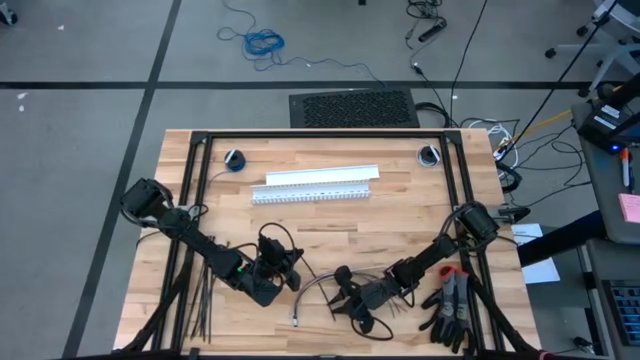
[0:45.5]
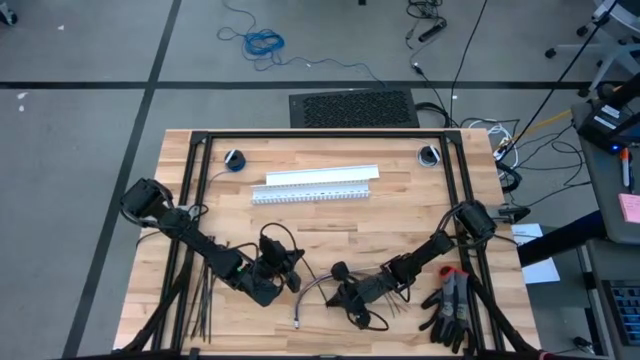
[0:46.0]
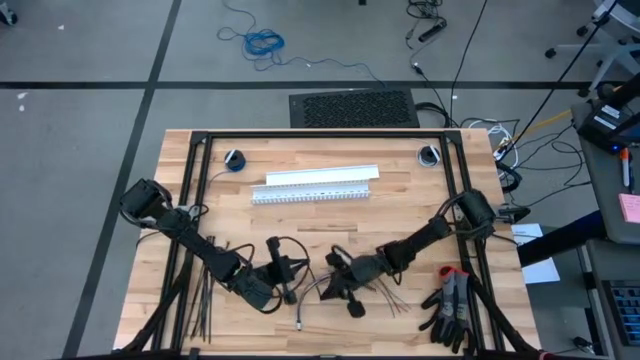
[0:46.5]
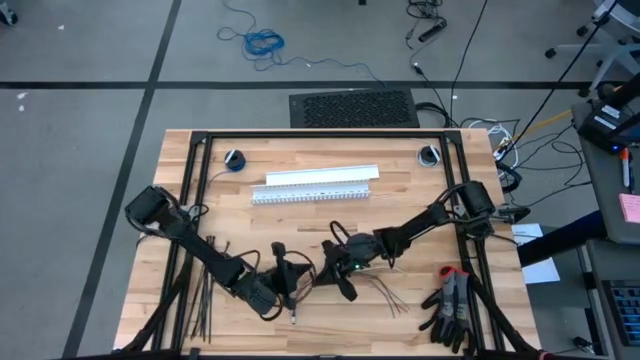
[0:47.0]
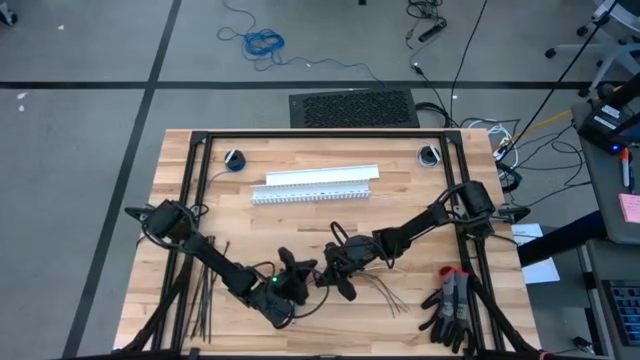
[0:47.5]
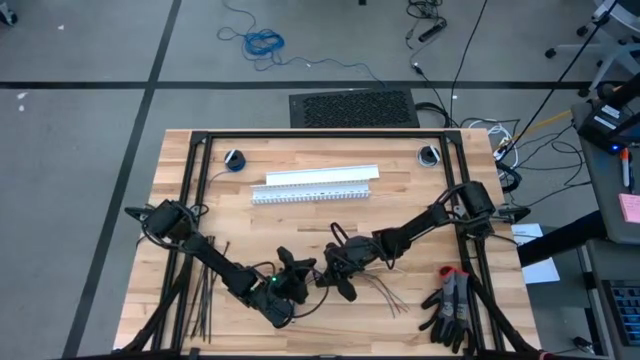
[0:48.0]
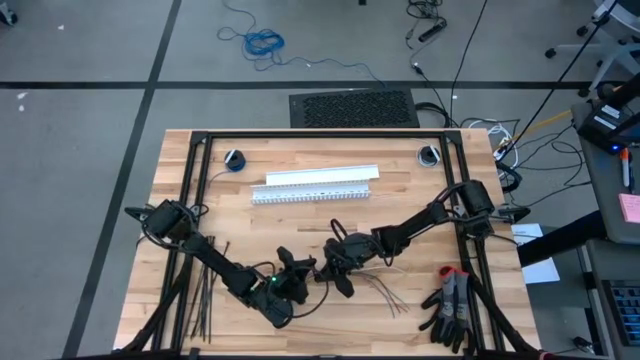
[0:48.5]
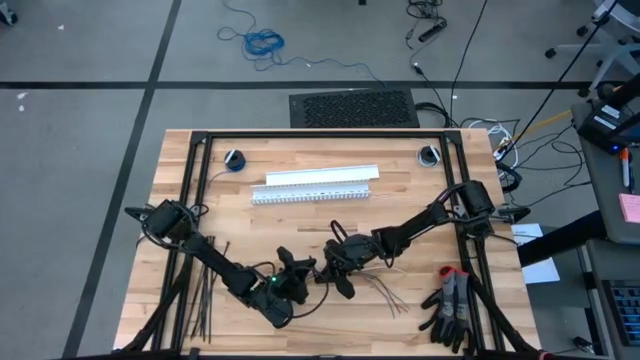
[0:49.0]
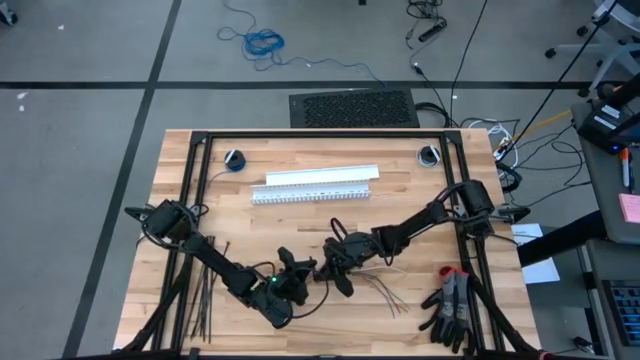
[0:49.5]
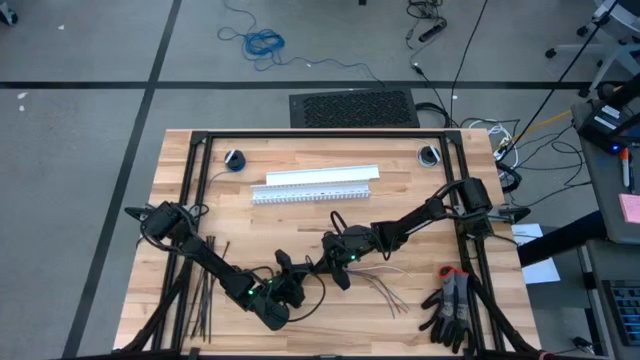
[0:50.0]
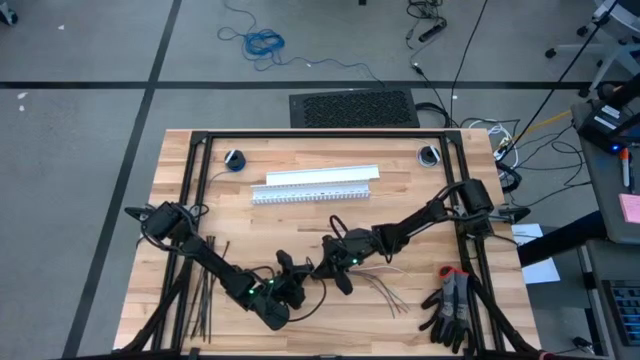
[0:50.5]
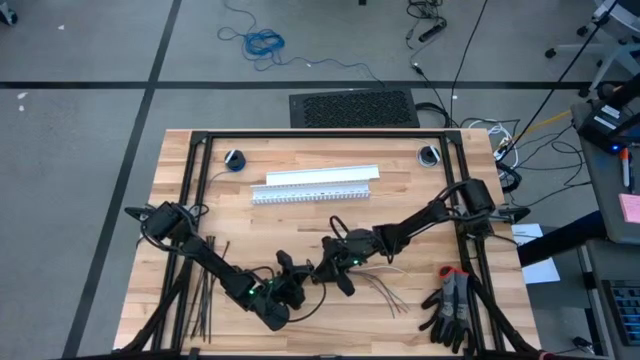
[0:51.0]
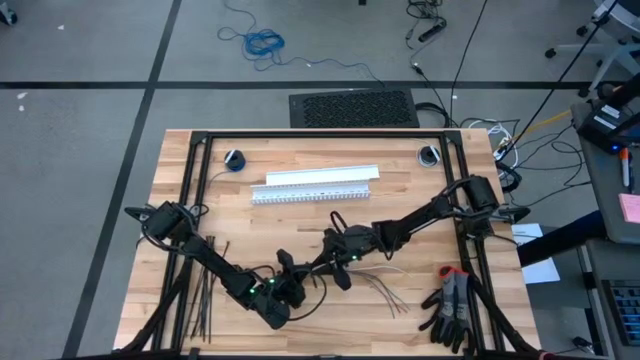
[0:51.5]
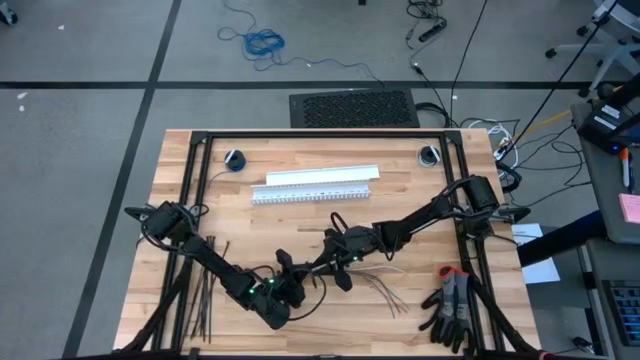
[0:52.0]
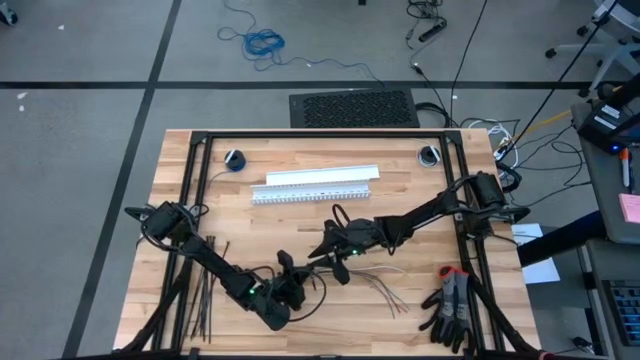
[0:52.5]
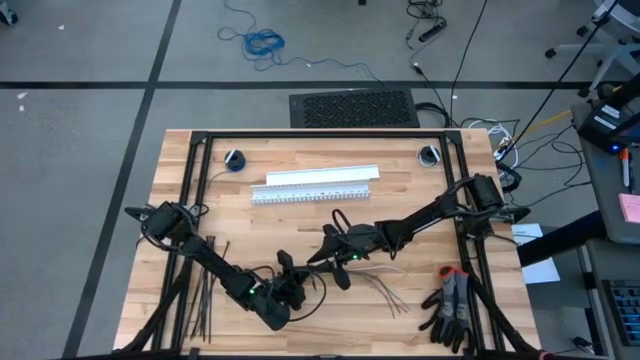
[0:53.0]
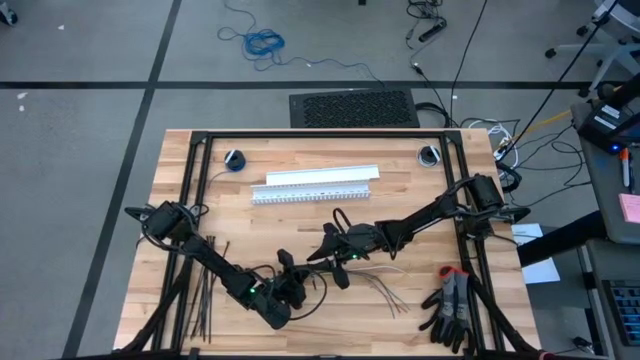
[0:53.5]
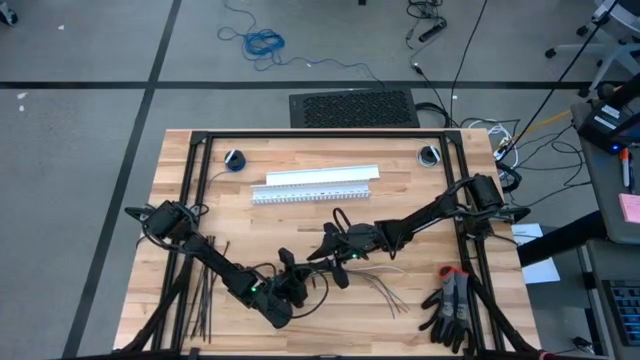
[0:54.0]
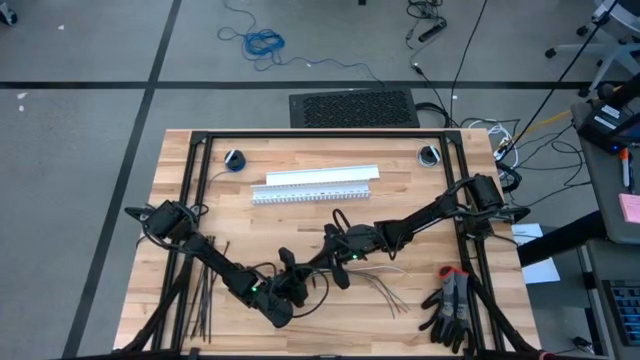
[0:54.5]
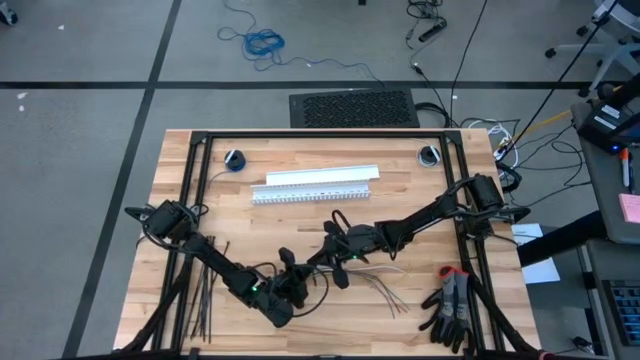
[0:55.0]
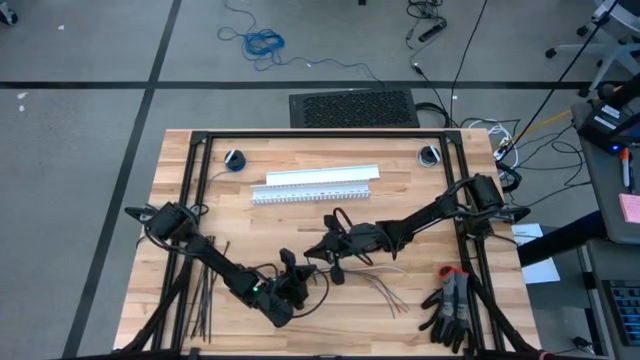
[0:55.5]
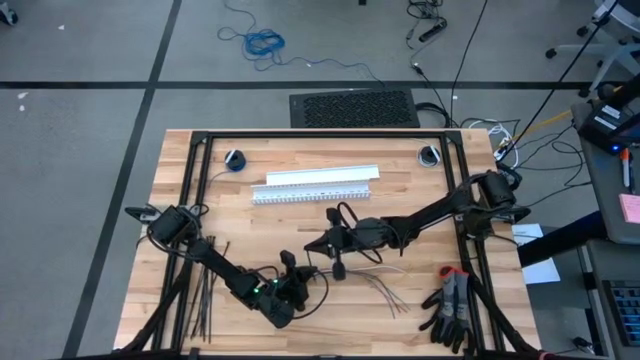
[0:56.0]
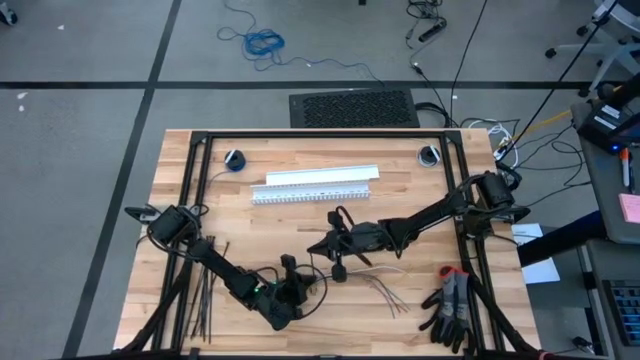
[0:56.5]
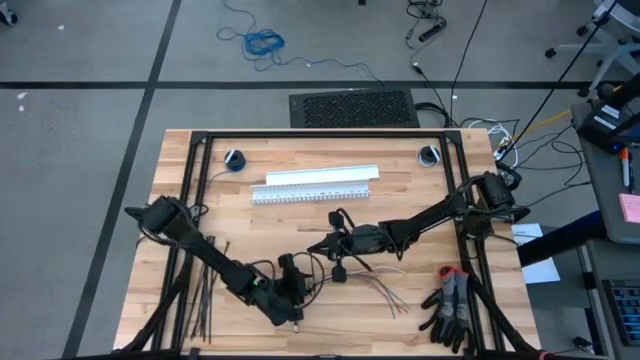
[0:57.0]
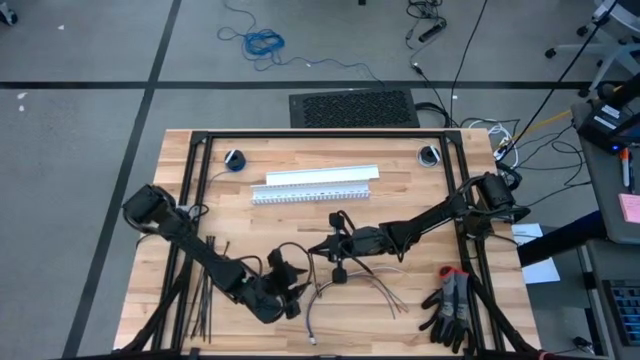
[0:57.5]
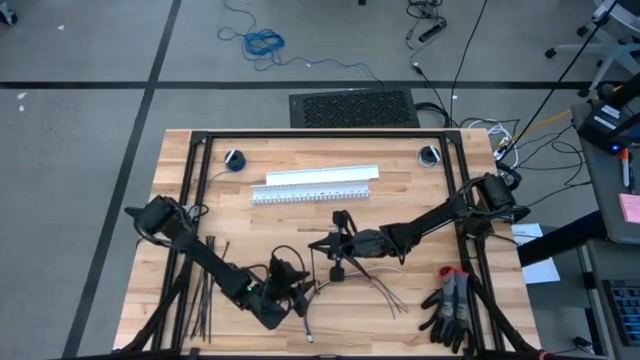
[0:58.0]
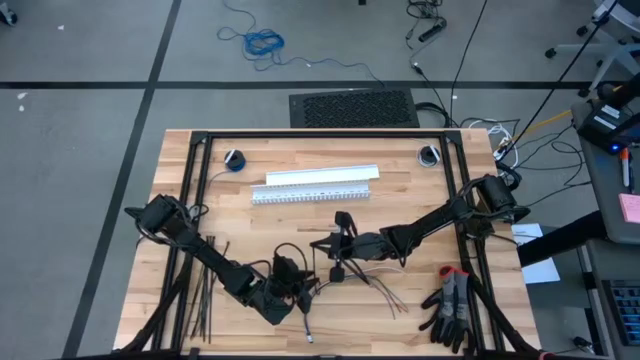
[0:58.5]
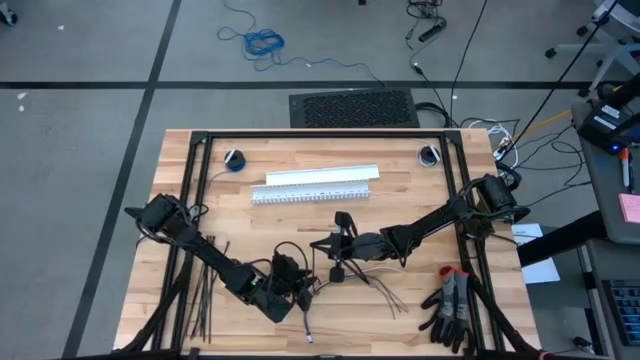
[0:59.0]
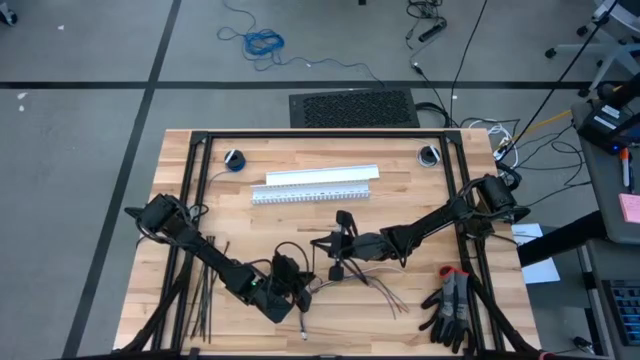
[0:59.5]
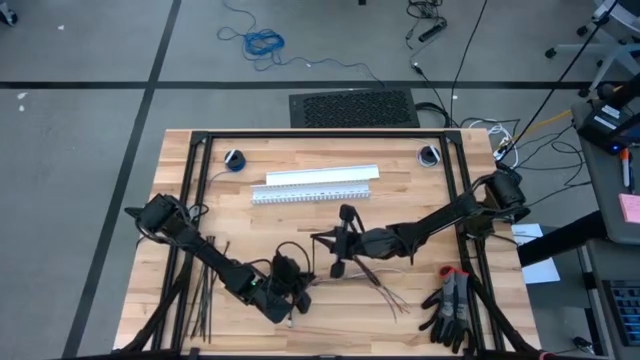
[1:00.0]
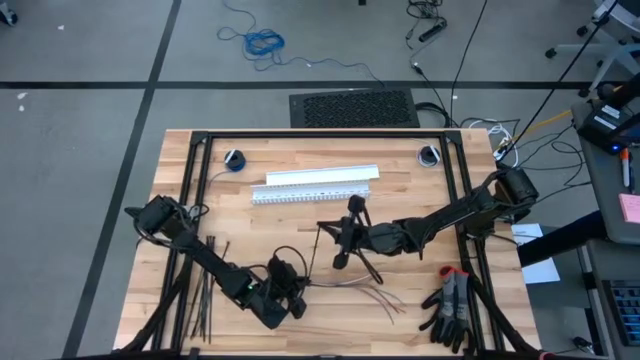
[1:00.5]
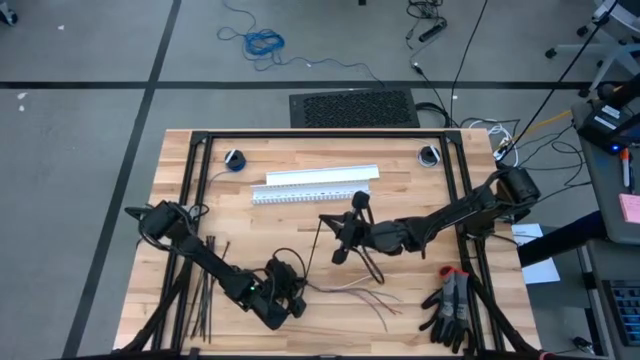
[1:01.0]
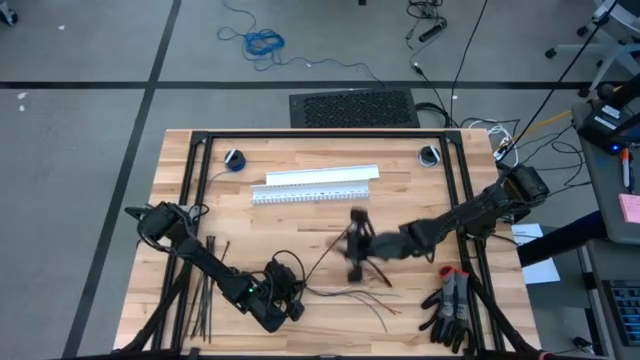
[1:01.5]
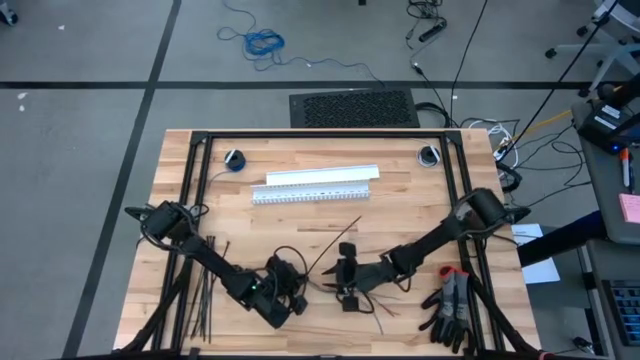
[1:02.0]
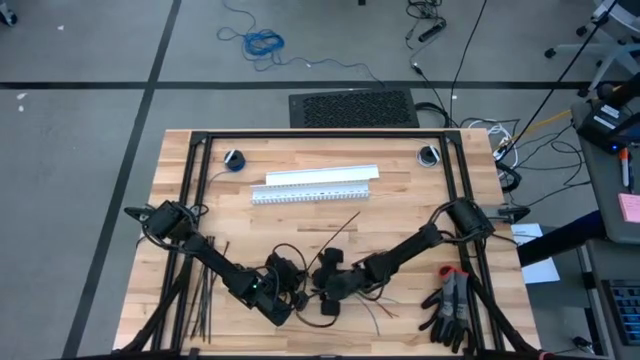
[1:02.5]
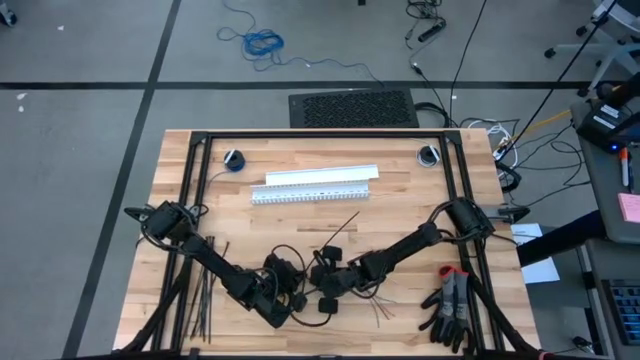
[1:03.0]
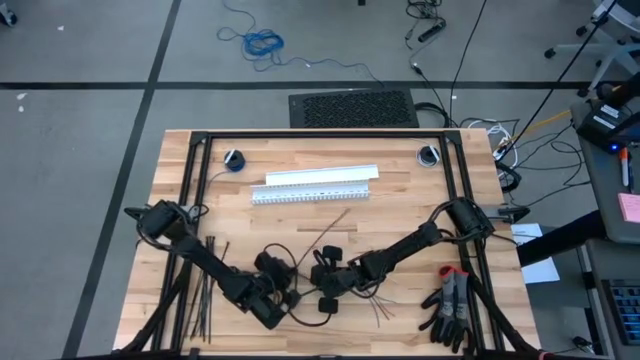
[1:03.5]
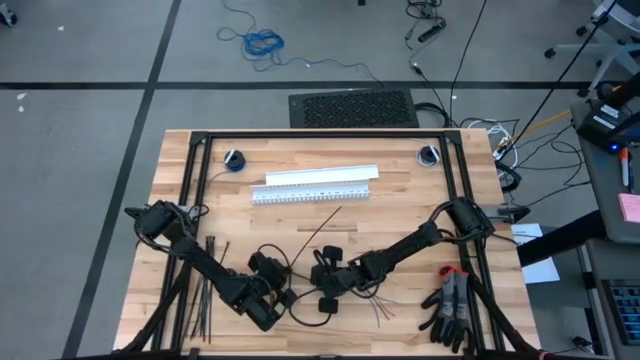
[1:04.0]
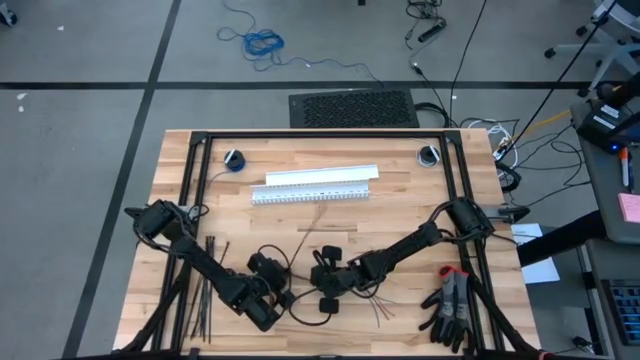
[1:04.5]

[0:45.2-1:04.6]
Task: Ziptie cables
Wrap the black zip tie on the cables

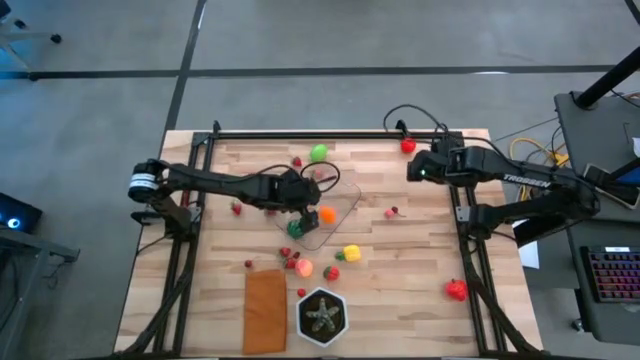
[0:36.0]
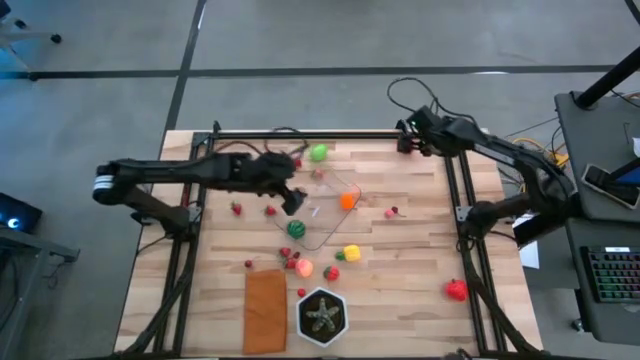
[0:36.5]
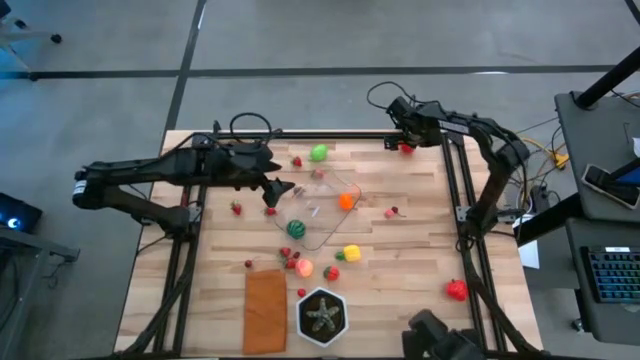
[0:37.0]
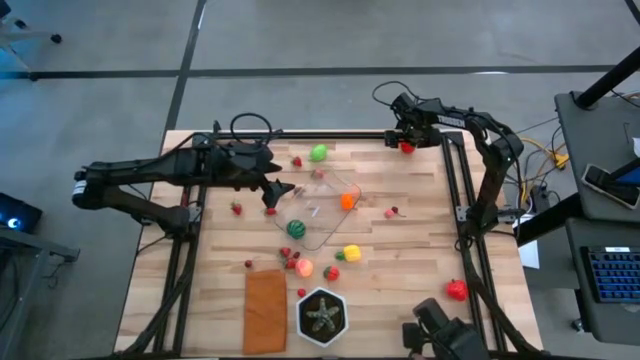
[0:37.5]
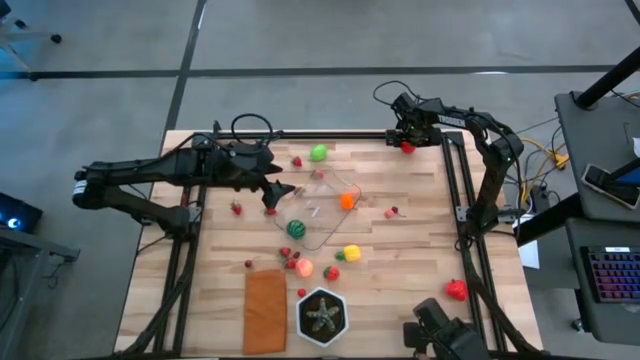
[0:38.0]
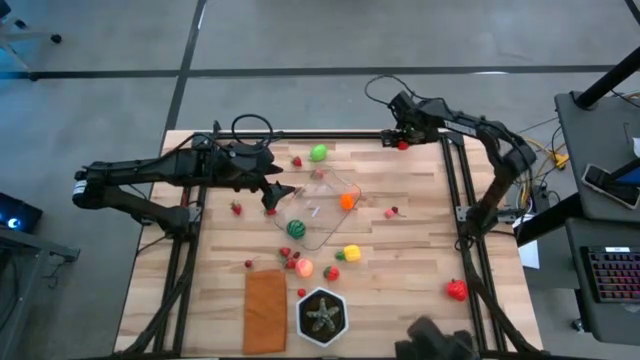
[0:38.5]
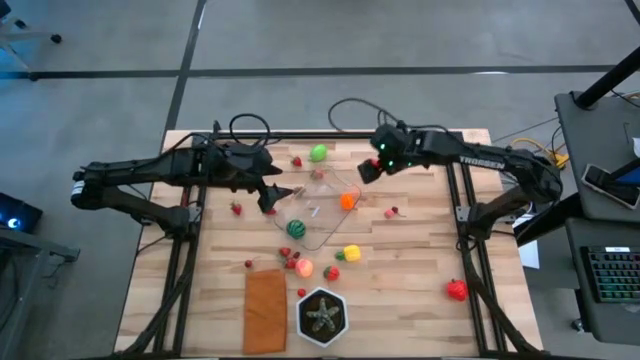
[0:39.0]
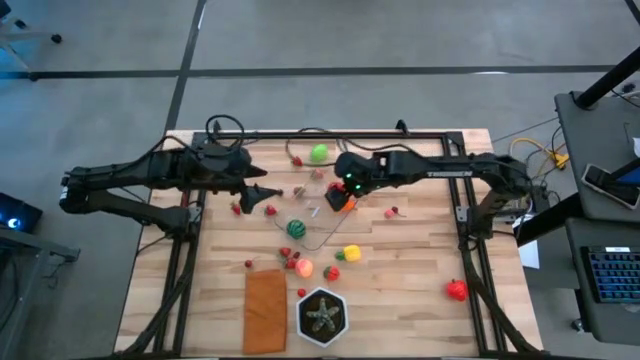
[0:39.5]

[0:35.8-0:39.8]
Task: Pick and placing Produce into tupperware
Put the red tomato into the transparent bin
